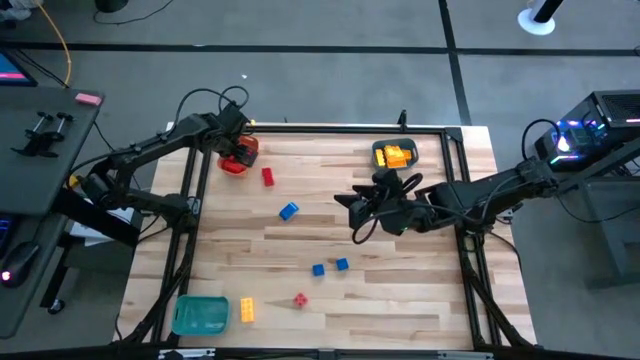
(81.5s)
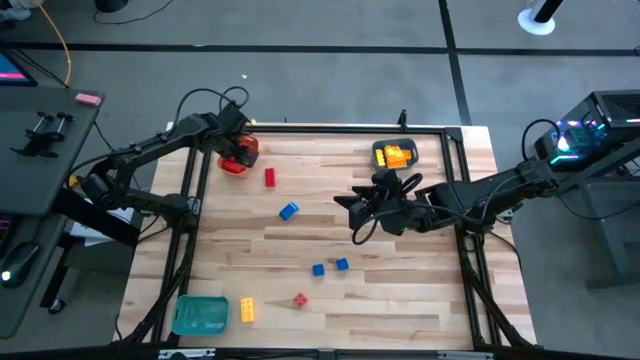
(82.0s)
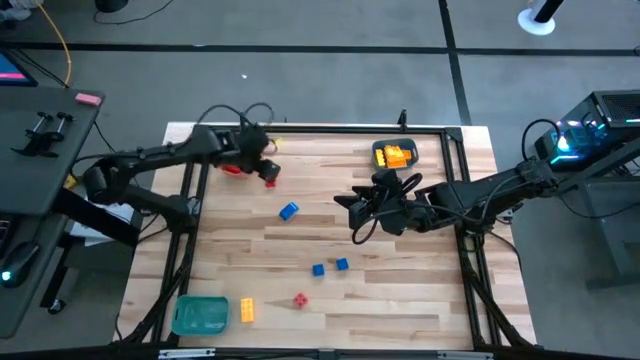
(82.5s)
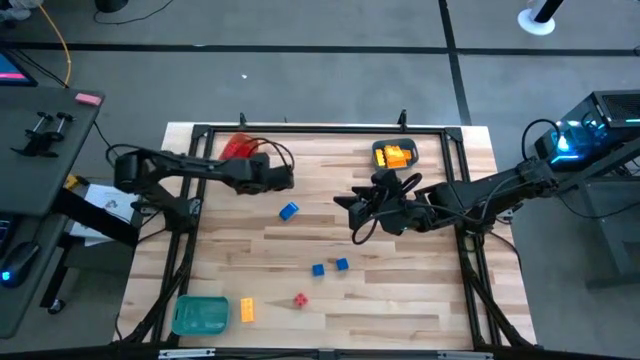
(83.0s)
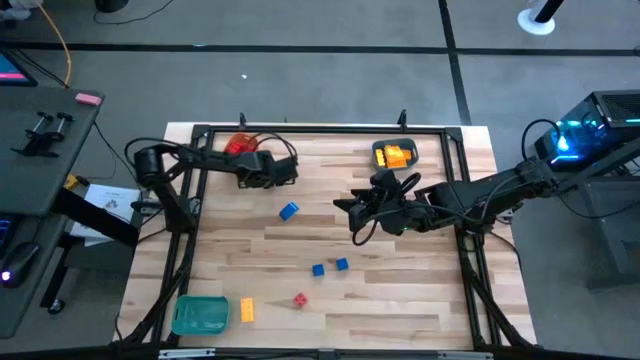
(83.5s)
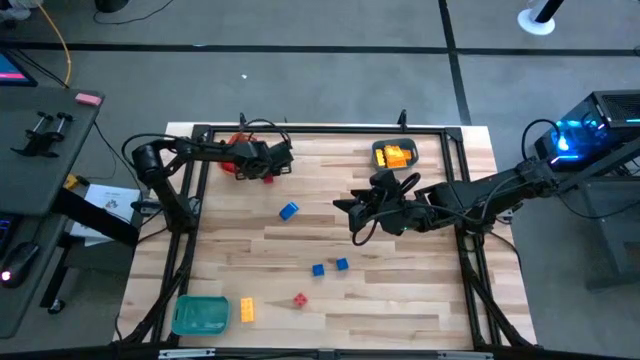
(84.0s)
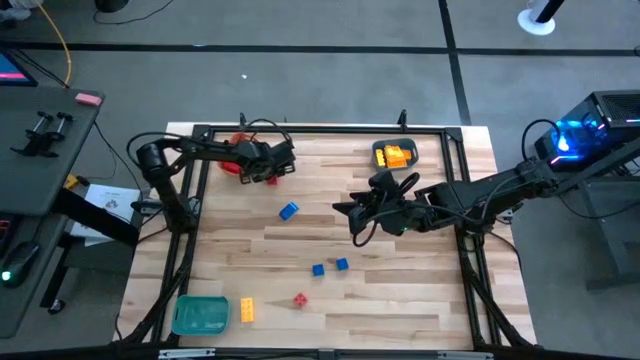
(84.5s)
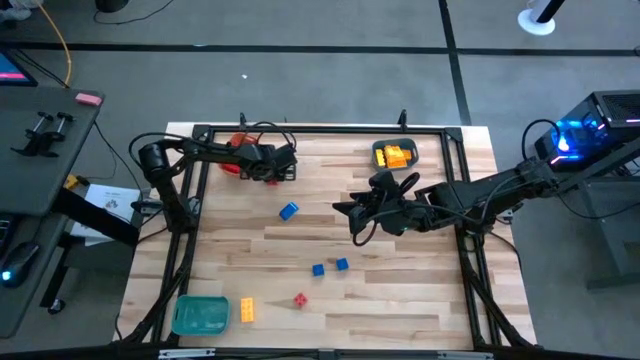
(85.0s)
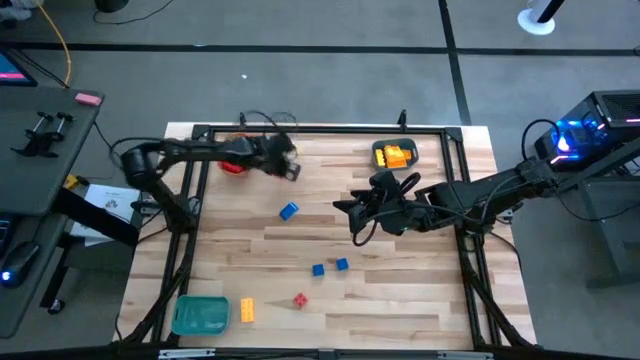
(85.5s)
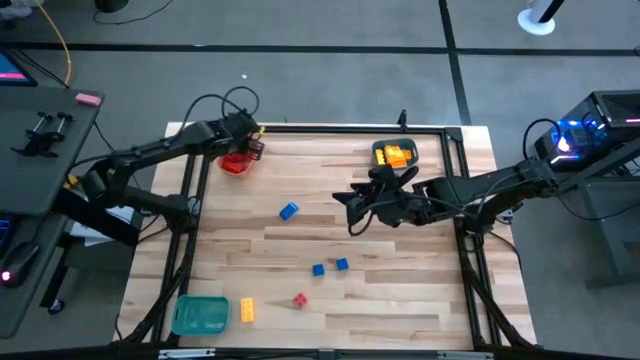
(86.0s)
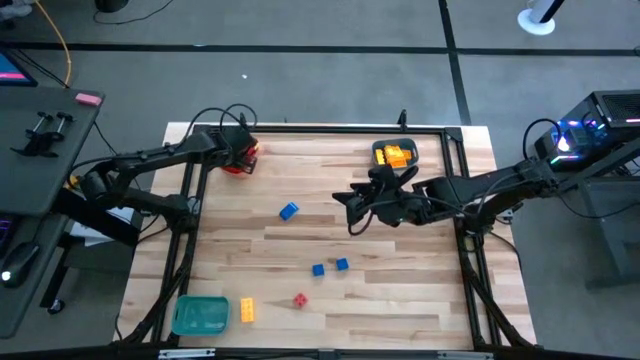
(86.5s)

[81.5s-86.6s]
Task: Sort blocks
Put the red game piece into the orange bin

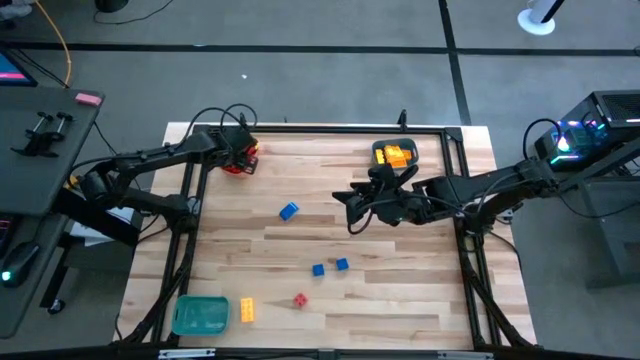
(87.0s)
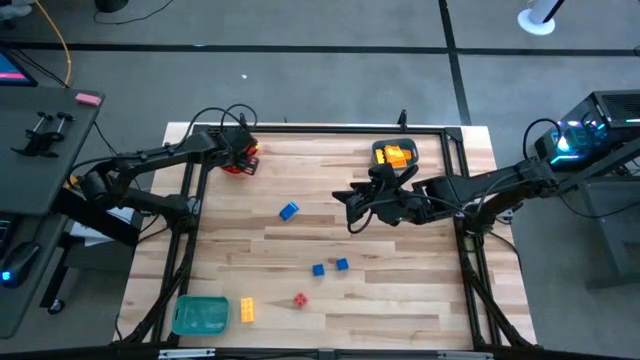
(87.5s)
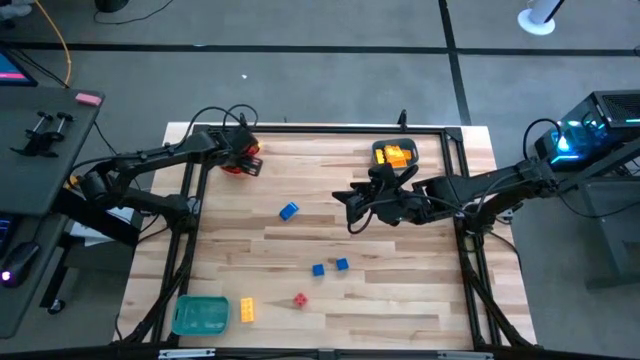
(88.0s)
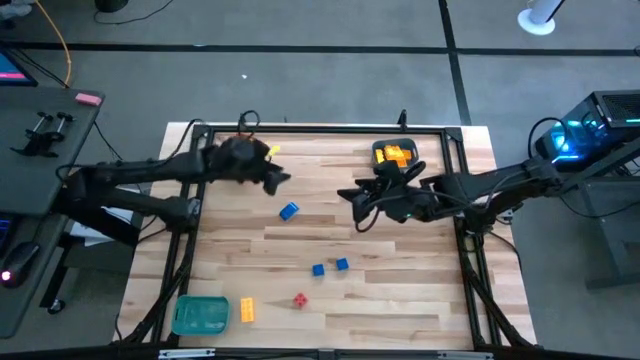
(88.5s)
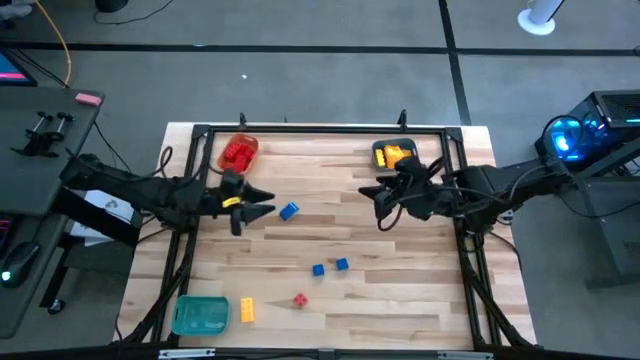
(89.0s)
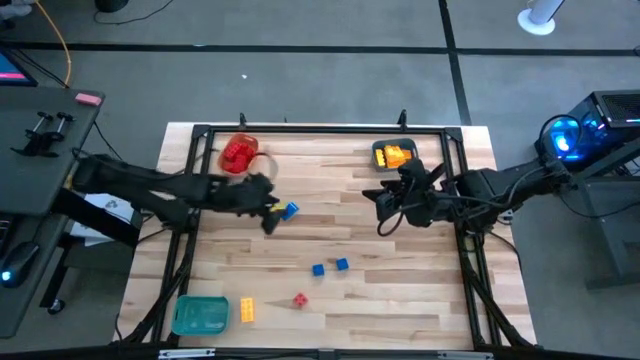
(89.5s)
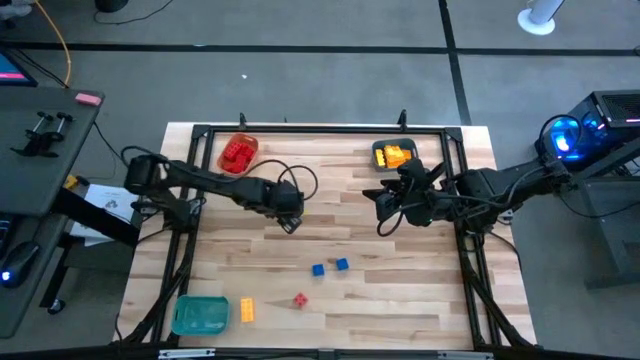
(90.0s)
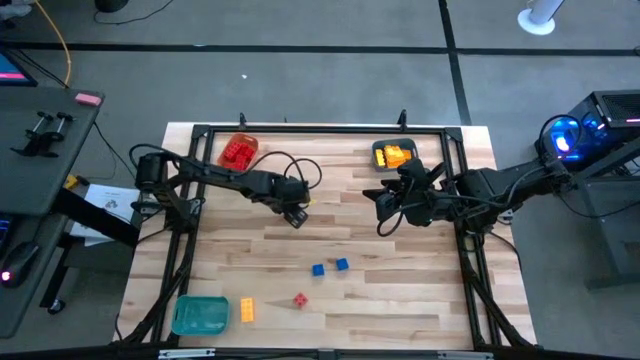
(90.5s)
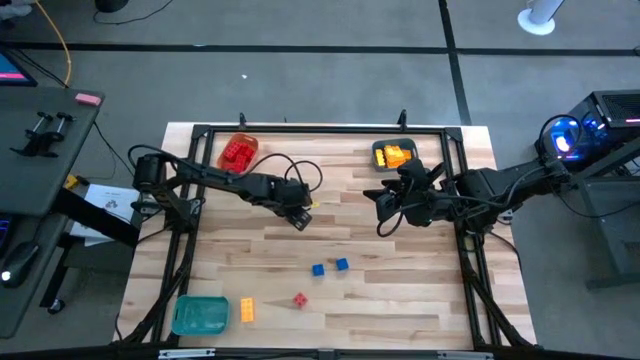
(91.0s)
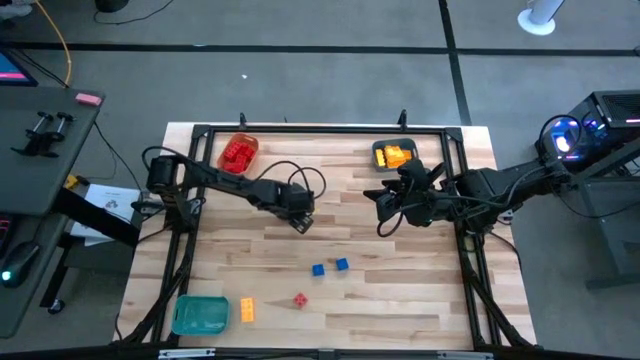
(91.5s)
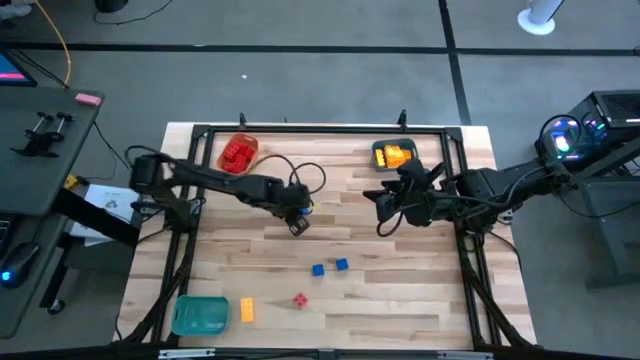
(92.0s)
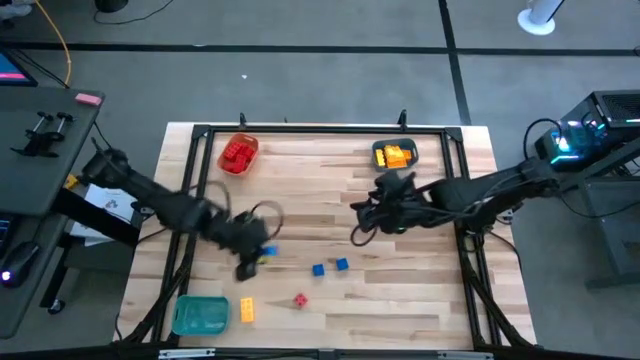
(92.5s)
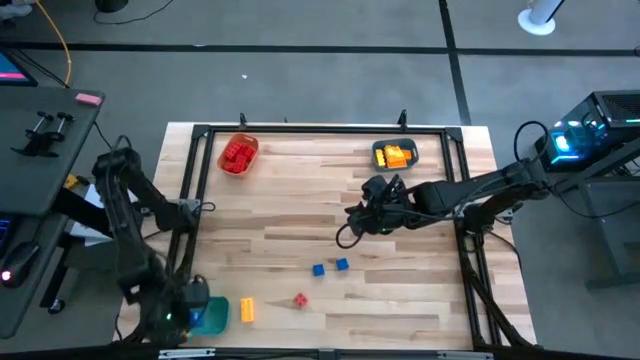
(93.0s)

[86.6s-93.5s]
Put the blue game piece into the green bin

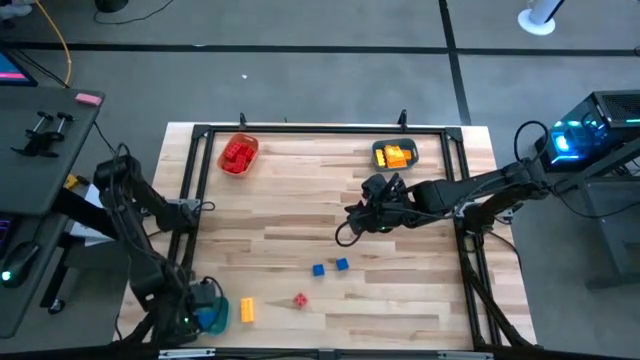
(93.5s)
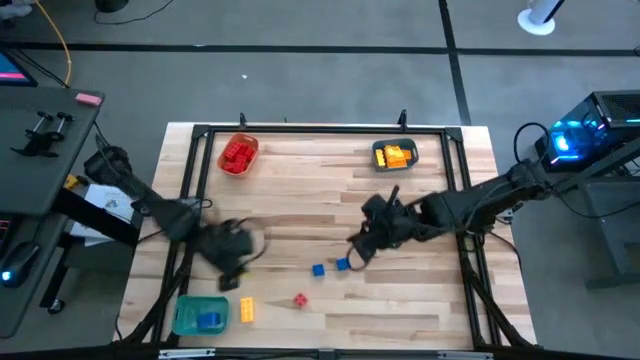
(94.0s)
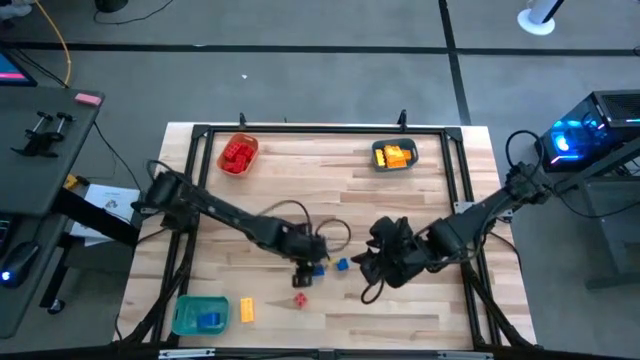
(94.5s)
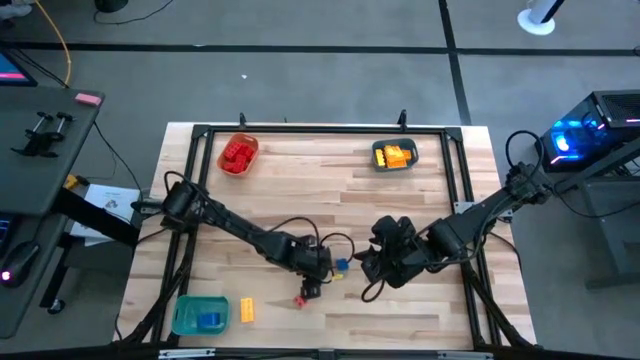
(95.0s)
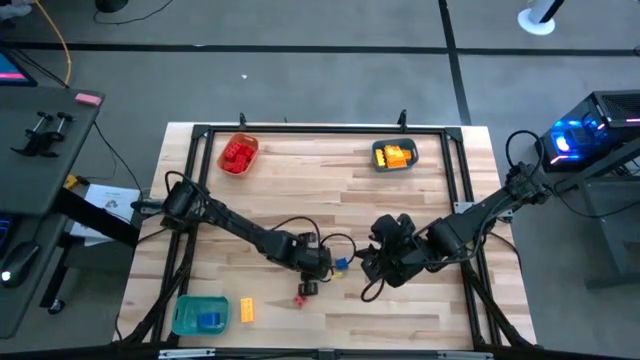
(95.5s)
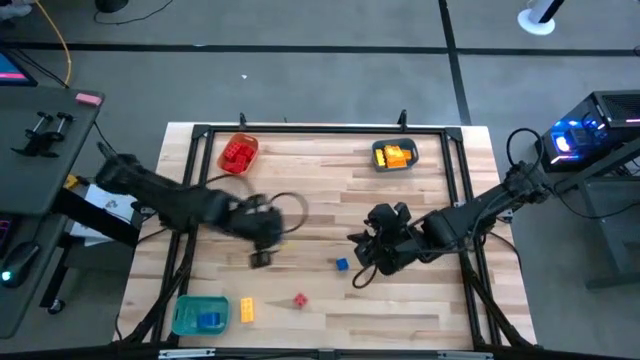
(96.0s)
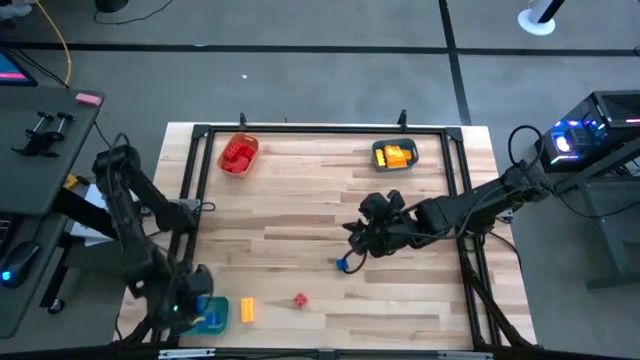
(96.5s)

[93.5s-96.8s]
Put the blue game piece into the green bin

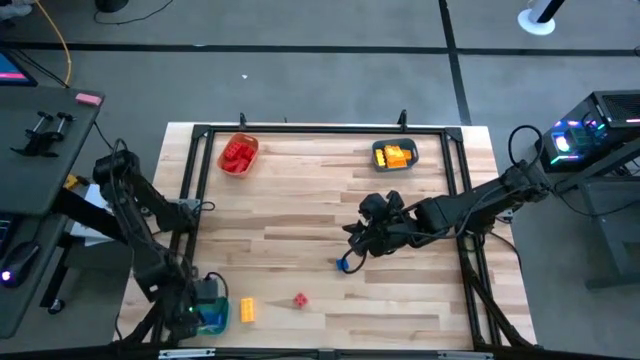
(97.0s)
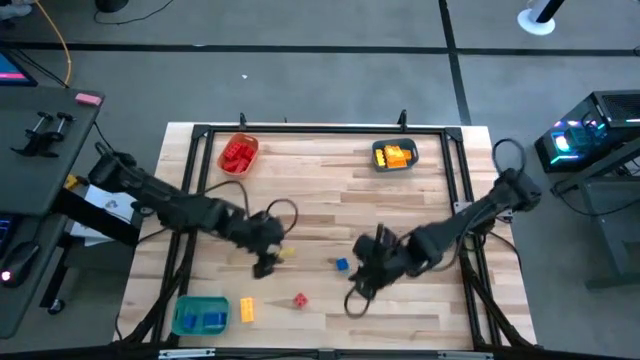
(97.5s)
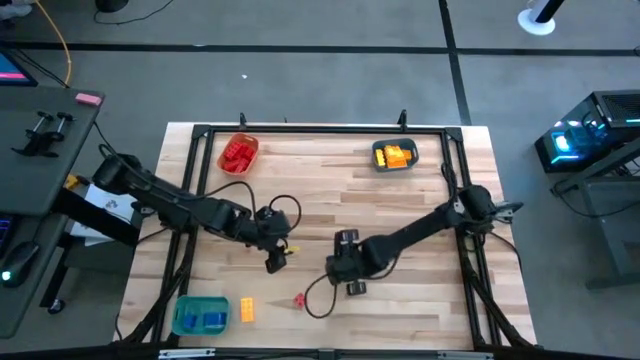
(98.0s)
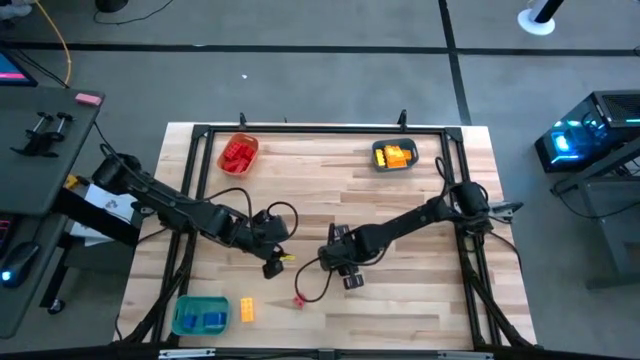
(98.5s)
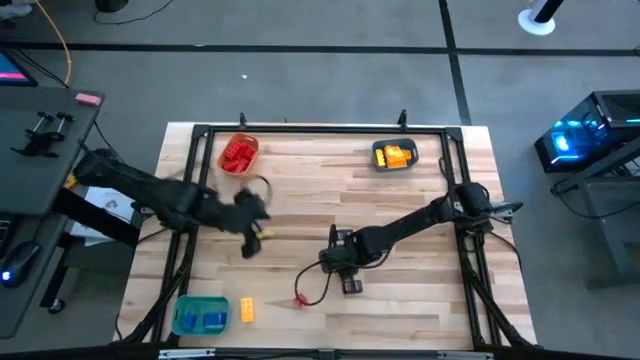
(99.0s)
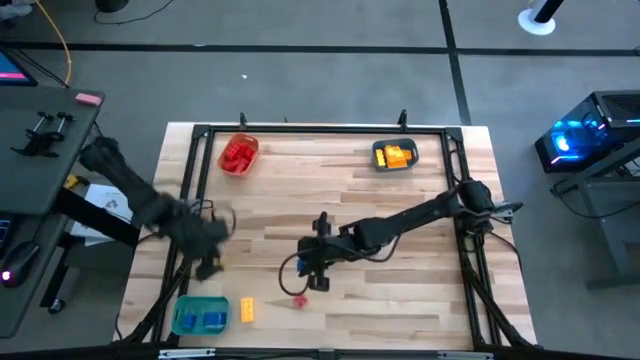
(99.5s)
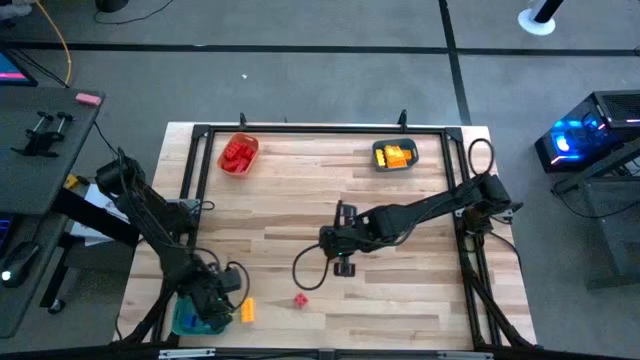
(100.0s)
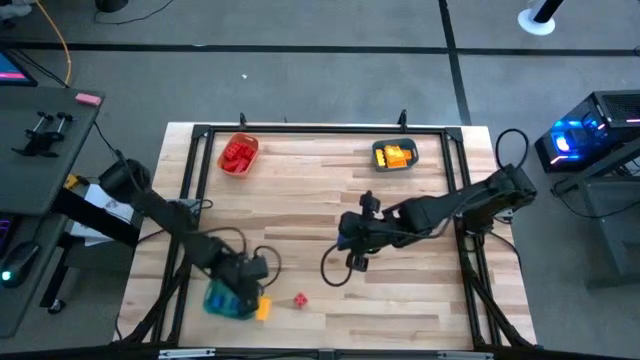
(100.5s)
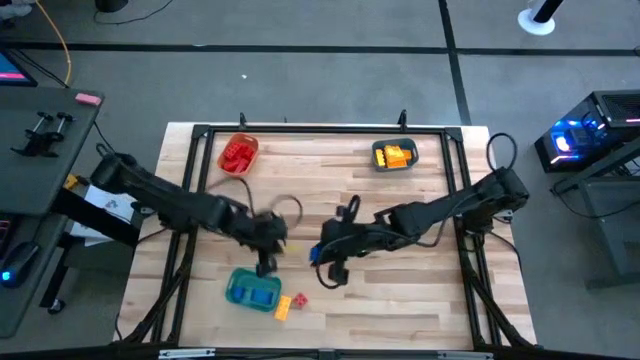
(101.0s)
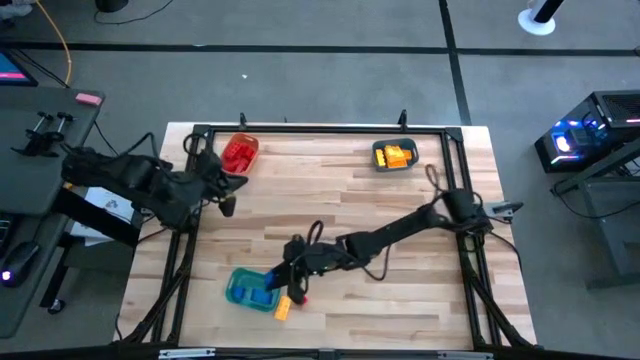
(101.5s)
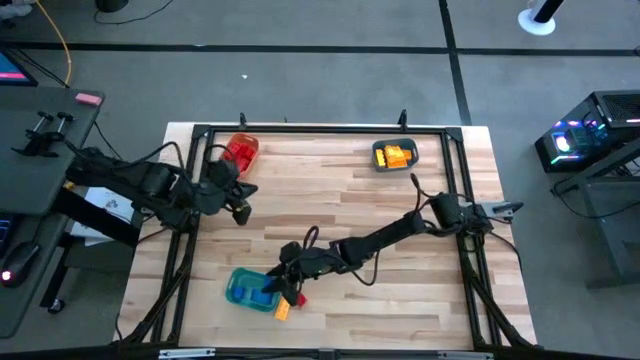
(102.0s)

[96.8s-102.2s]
Put the blue game piece into the green bin

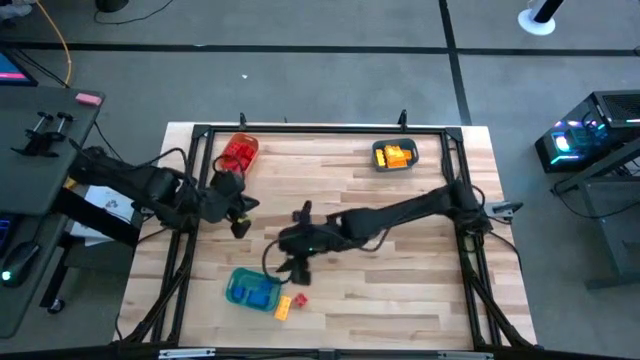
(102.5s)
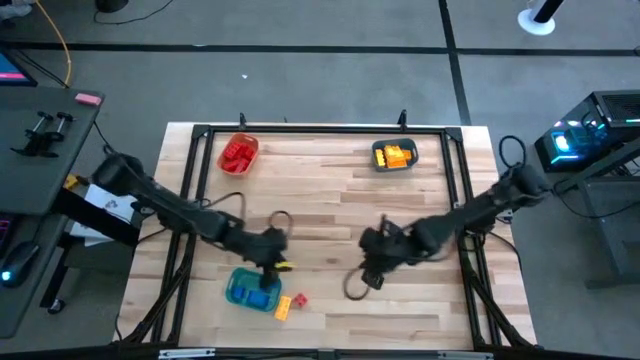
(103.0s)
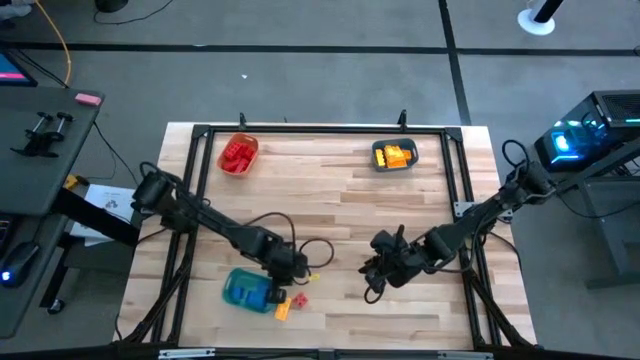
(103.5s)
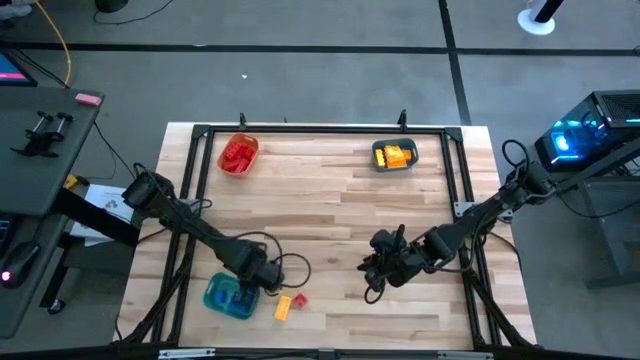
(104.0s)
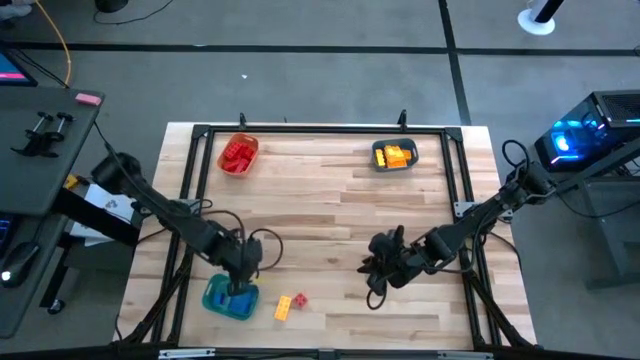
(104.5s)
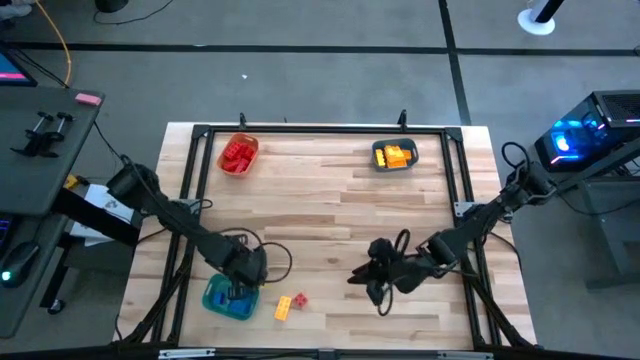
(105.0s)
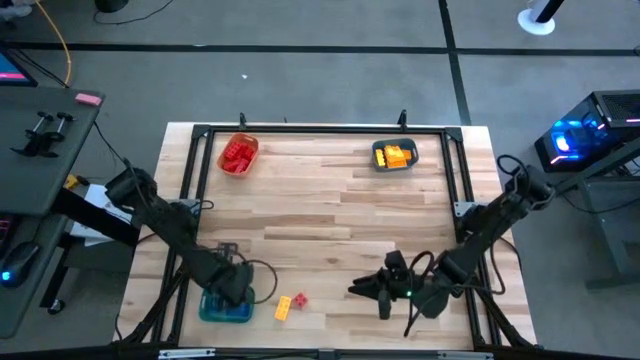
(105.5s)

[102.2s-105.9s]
Adjust the green bin
